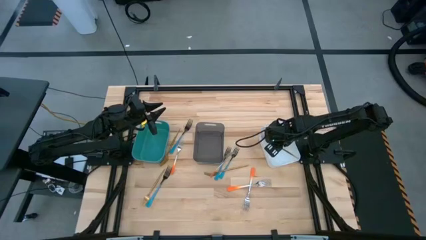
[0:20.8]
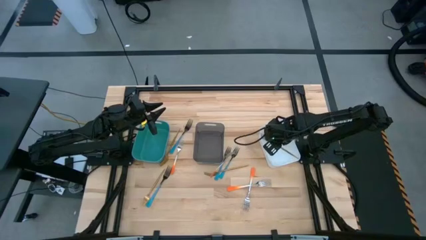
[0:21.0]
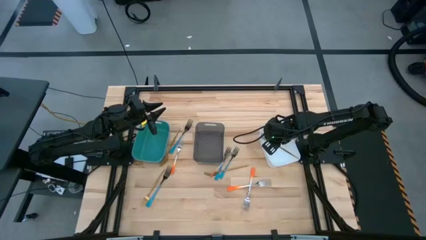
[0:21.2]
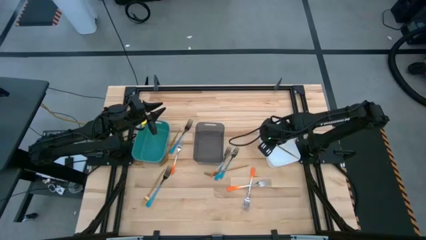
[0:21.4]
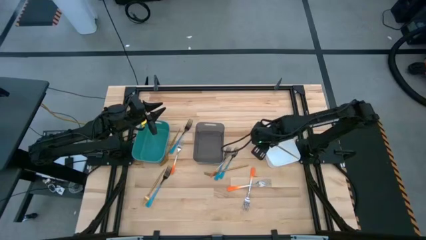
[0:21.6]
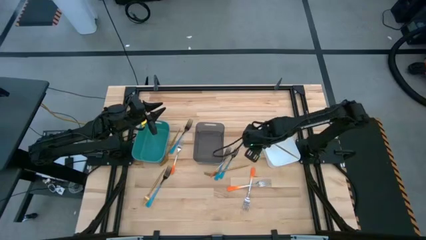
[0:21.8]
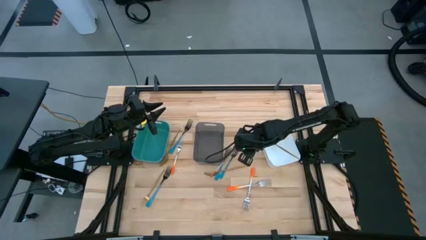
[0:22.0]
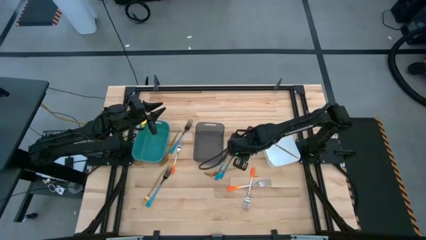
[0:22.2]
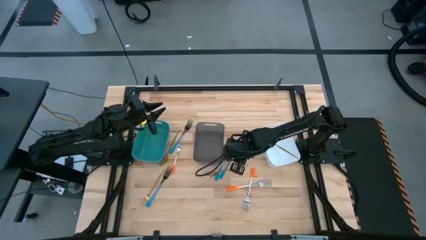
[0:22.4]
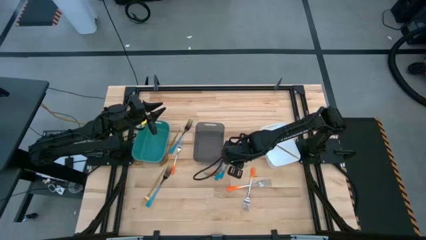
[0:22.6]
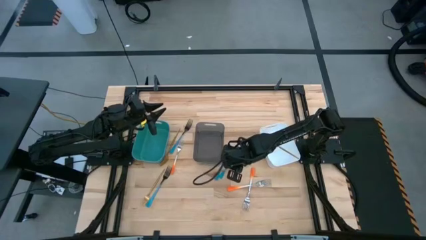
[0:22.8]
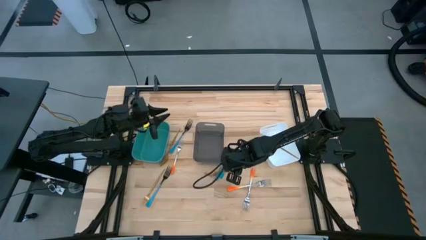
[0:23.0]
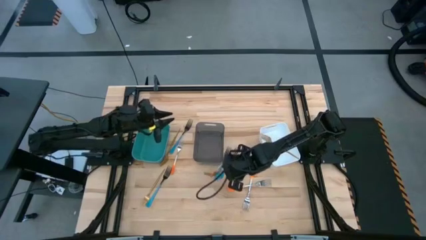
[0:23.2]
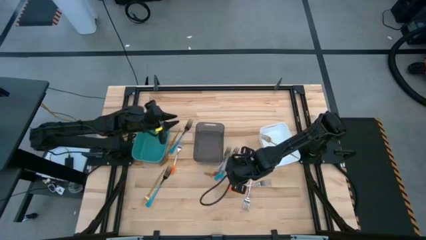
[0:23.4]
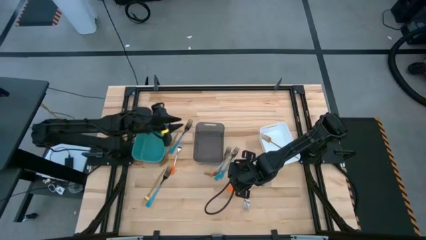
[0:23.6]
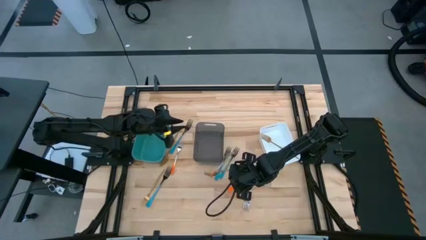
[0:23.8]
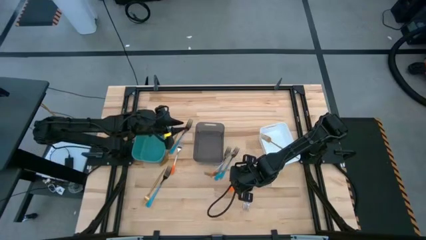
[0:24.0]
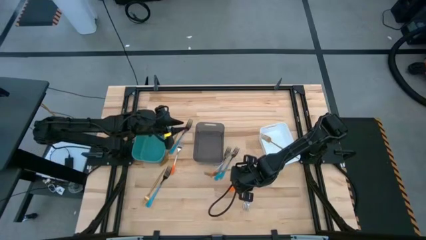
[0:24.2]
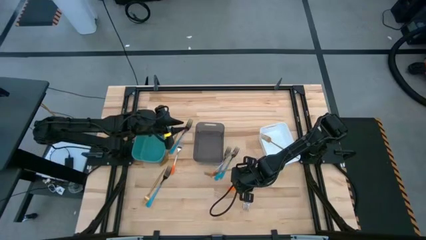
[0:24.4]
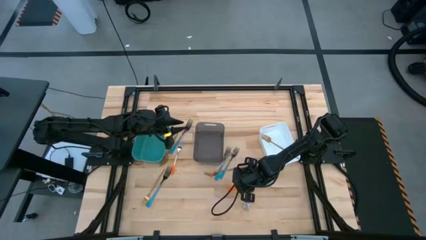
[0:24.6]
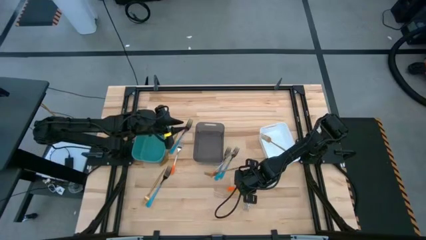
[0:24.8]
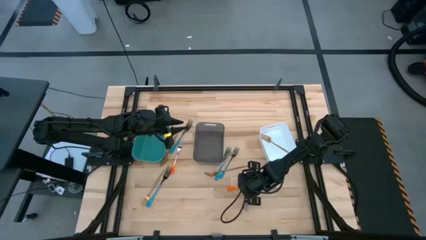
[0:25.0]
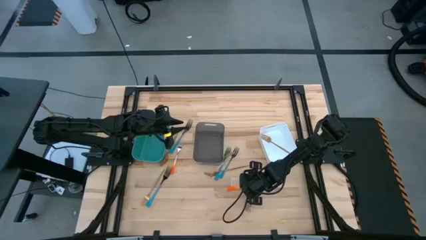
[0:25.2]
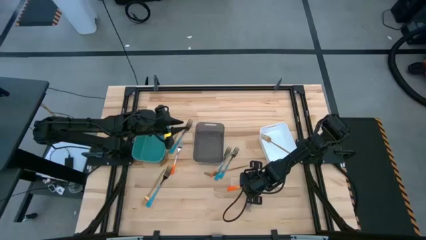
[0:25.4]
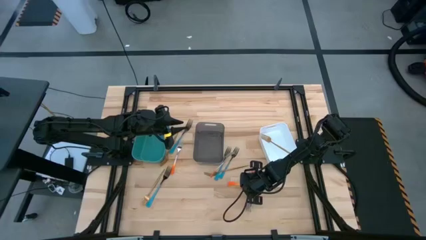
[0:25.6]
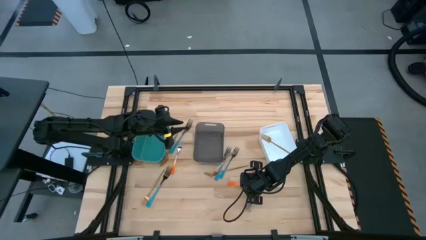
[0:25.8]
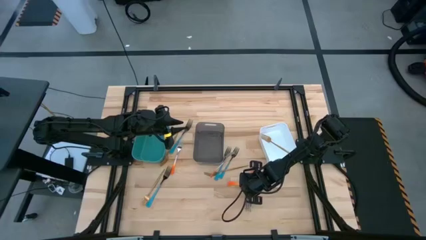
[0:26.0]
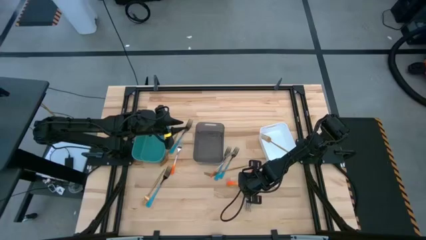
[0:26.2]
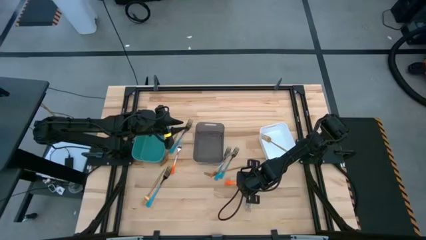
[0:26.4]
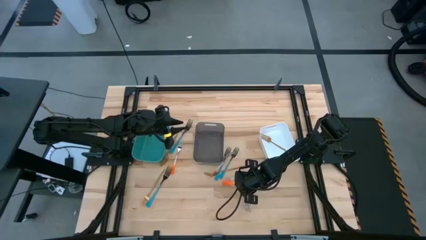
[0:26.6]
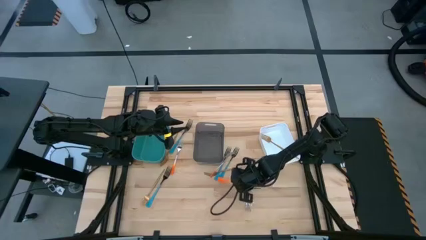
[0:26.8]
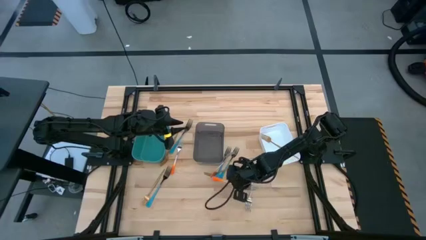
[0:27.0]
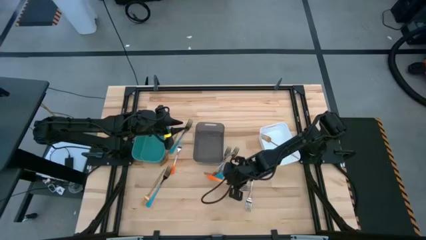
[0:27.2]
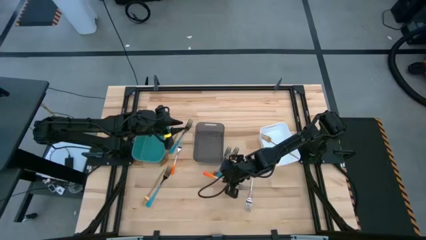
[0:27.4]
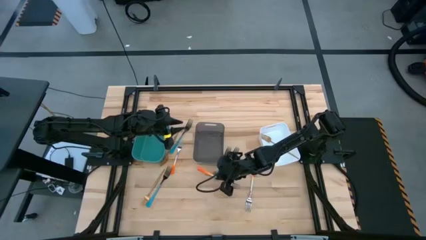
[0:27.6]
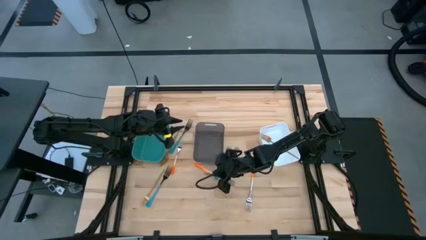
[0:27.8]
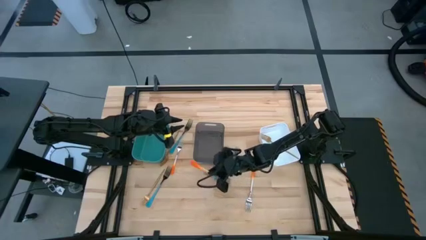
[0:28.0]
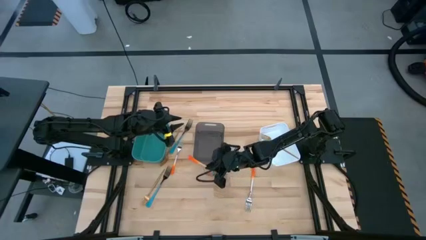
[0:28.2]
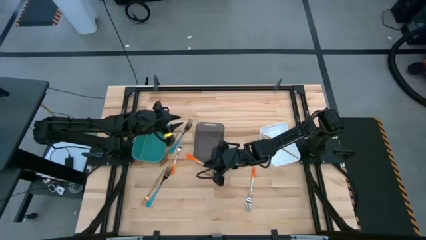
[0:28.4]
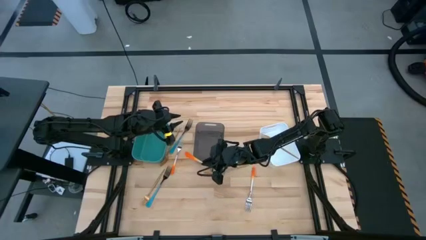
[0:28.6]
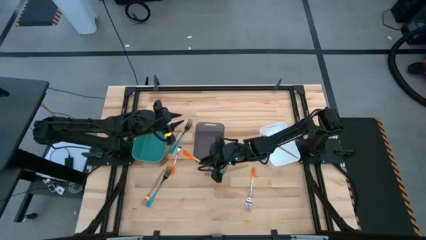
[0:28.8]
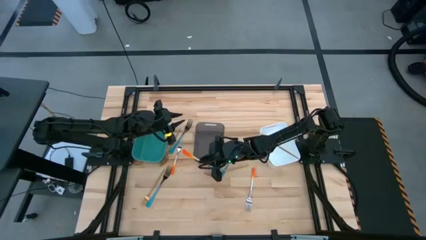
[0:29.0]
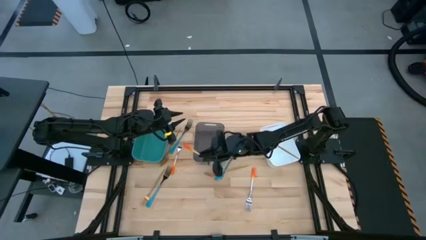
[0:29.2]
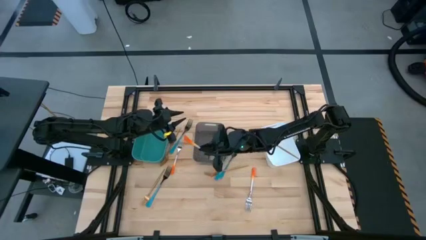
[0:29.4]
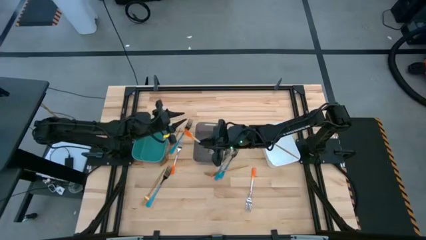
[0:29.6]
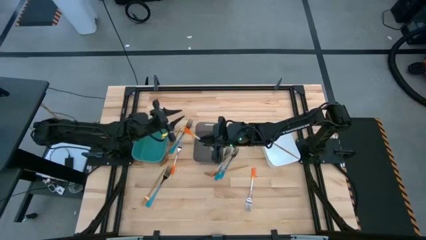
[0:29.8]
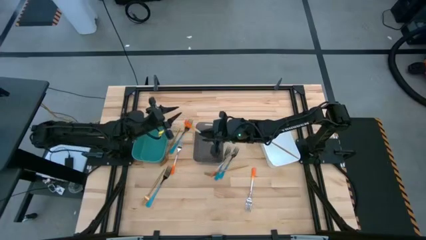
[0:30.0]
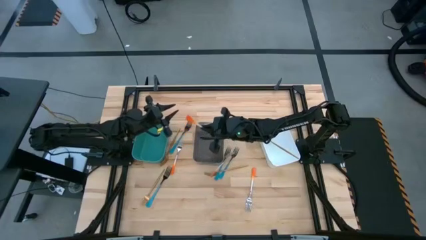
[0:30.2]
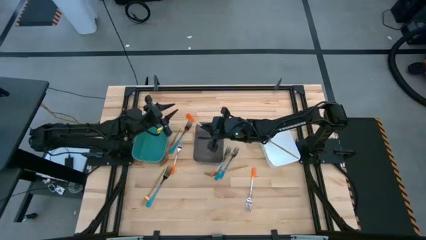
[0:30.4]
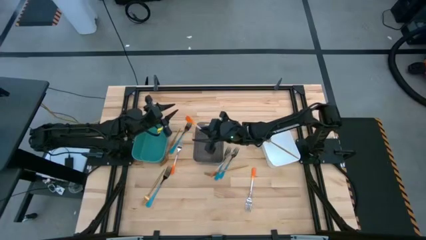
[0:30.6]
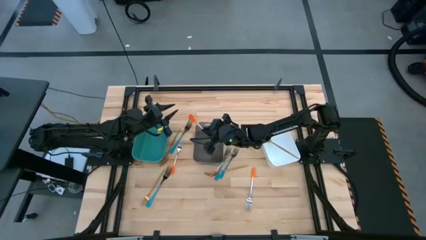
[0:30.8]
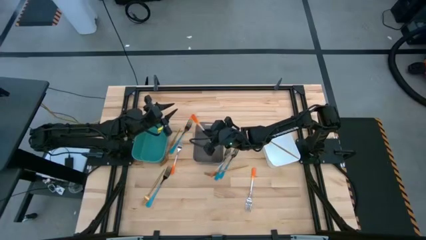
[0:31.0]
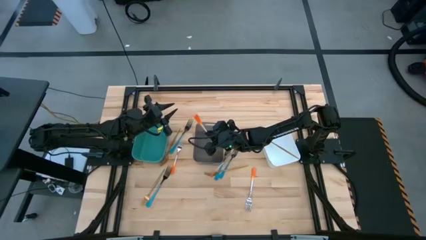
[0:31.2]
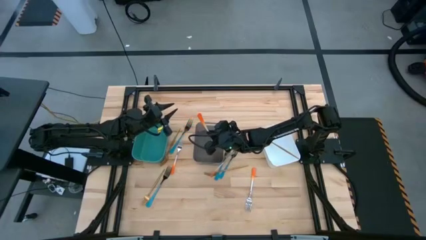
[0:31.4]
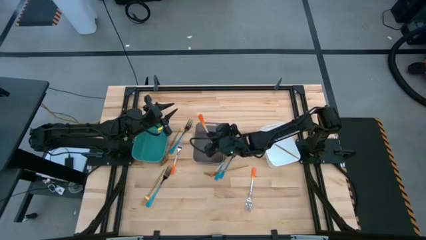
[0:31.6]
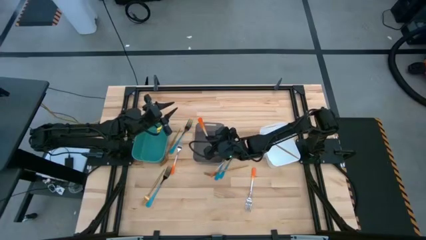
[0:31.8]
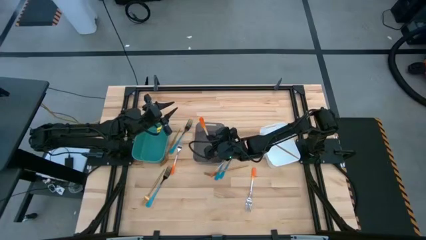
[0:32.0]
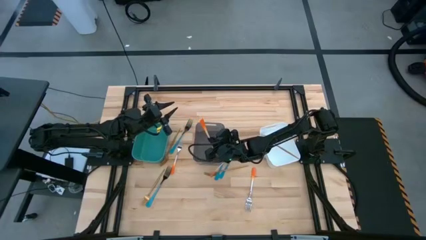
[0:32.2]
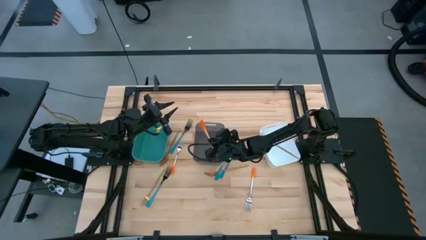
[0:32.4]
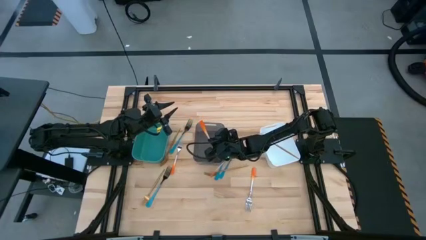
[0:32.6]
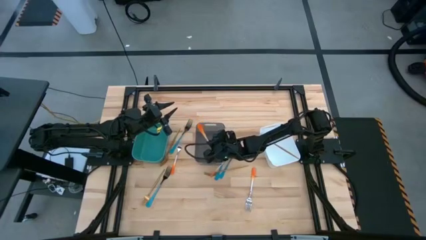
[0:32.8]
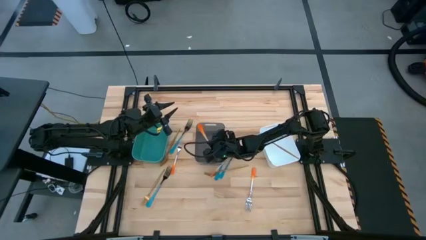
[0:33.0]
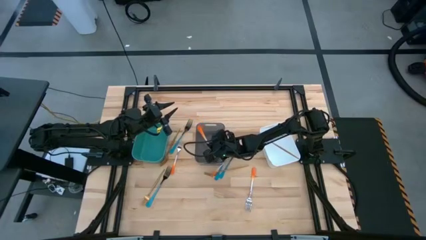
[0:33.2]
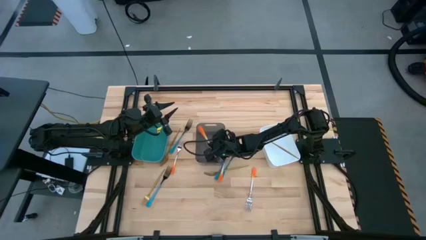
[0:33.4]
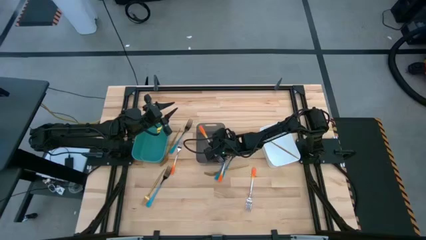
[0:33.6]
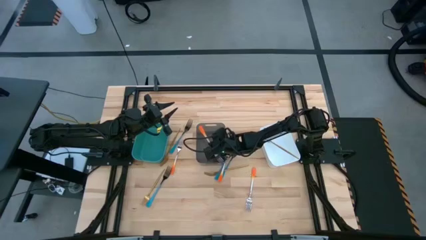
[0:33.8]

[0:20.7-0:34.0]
Task: Sort silverware by color (type)
Put the orange fork into the black bin

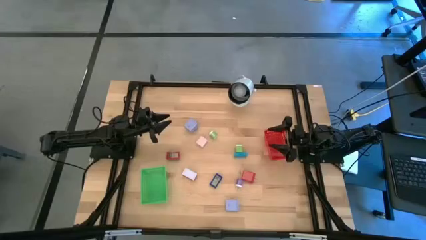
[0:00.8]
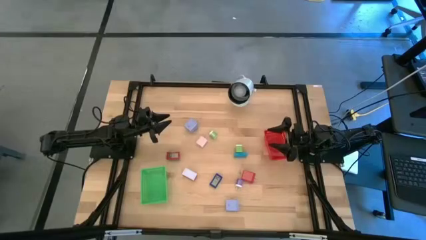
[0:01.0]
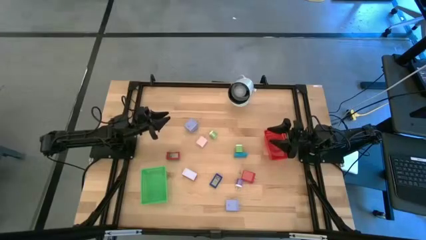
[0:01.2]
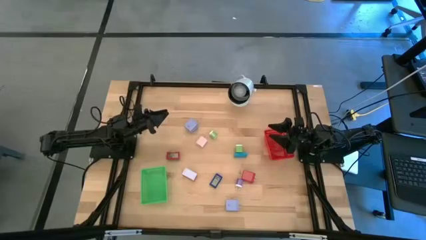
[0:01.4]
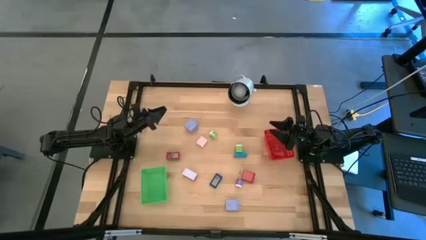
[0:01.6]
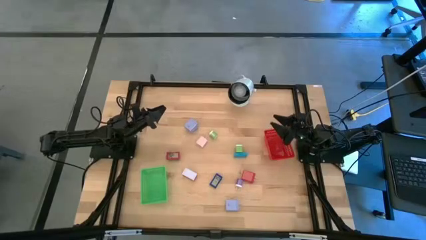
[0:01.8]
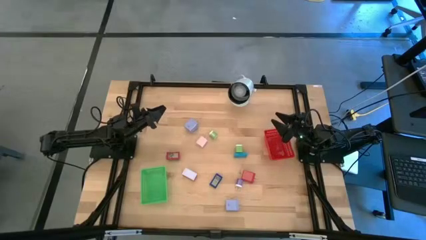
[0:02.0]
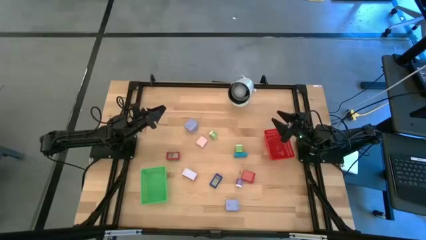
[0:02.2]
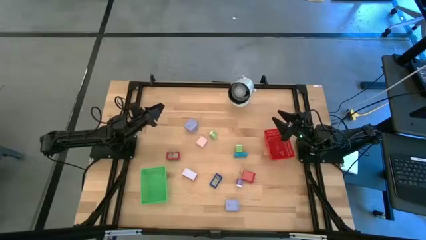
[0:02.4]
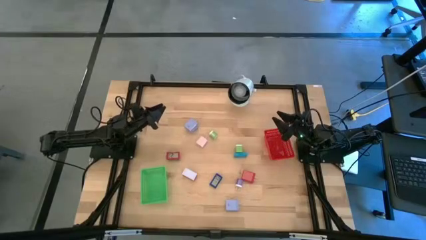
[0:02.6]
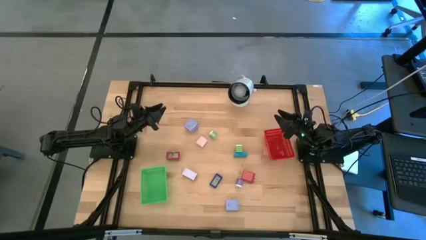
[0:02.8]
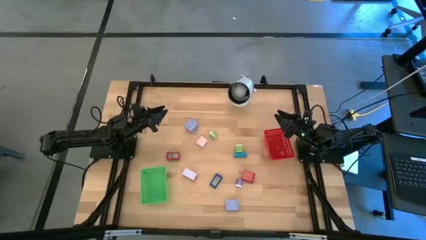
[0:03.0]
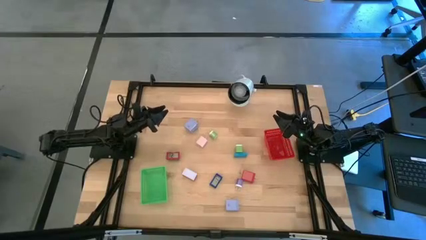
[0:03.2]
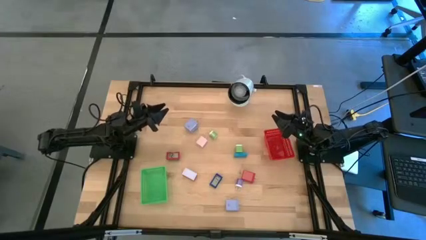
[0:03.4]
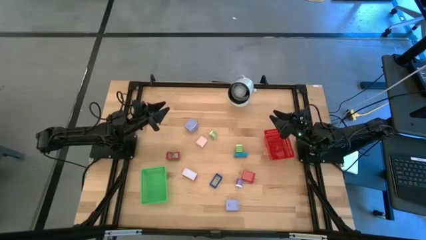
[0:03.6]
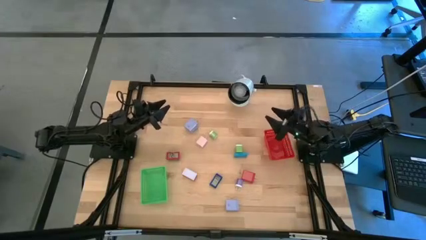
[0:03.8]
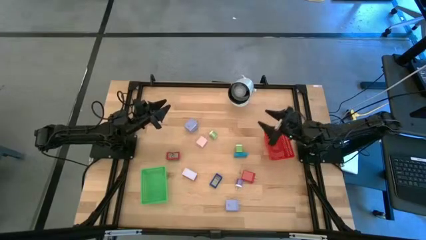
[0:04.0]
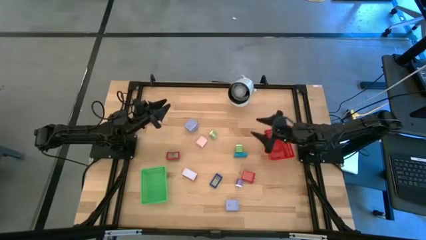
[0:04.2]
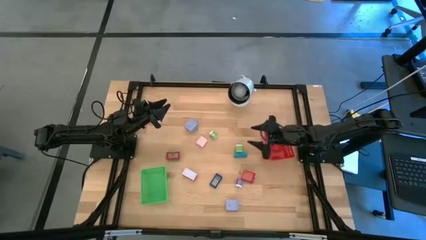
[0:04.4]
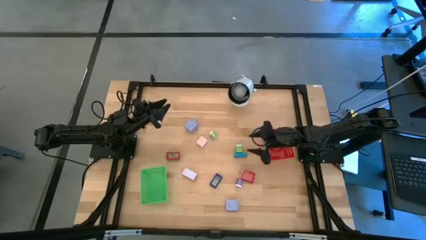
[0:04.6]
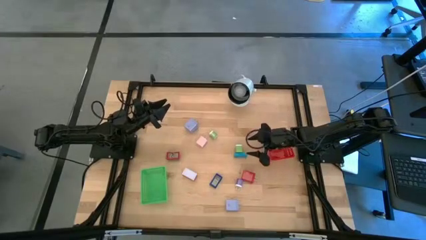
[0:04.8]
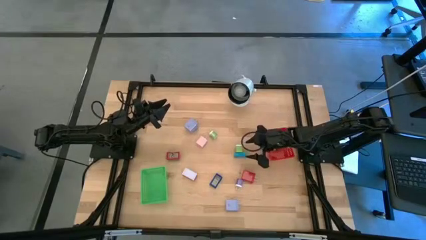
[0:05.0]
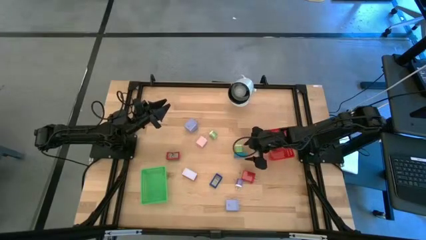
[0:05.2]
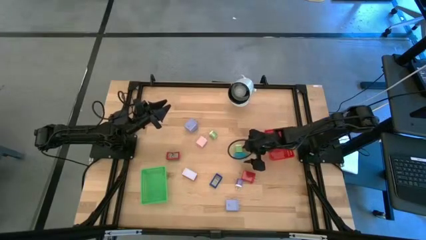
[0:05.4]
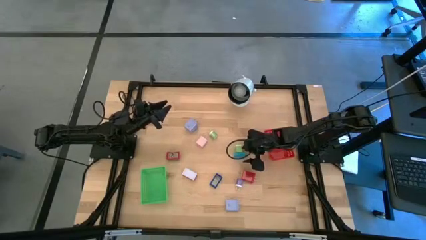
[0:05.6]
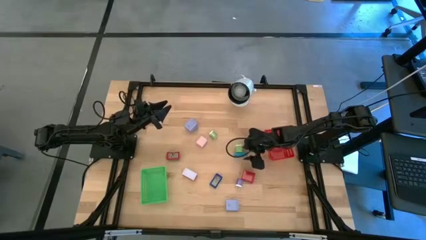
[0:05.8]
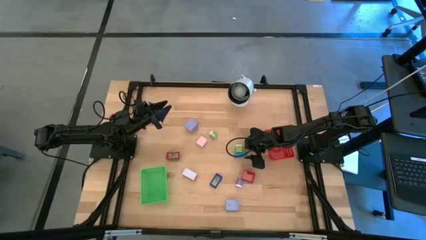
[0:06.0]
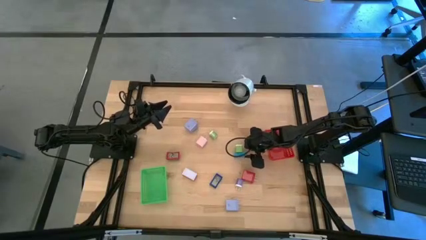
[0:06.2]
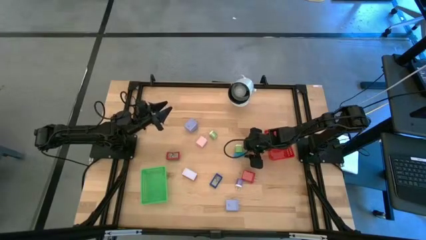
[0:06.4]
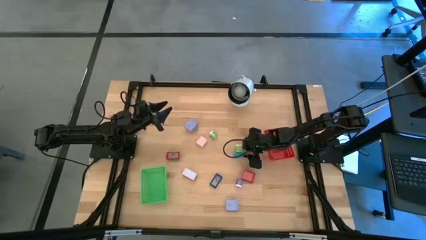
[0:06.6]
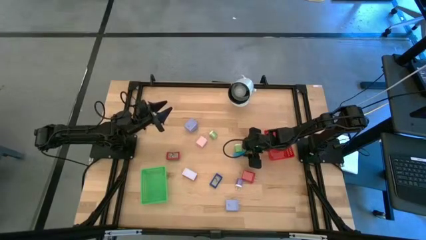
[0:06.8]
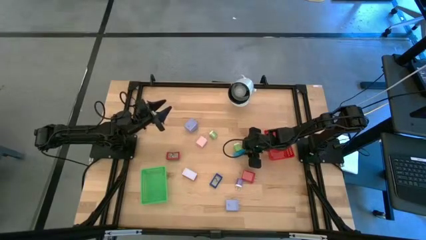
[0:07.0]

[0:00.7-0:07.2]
Task: Pick & Place Office items
Put the right light blue digital clock into the green bin
